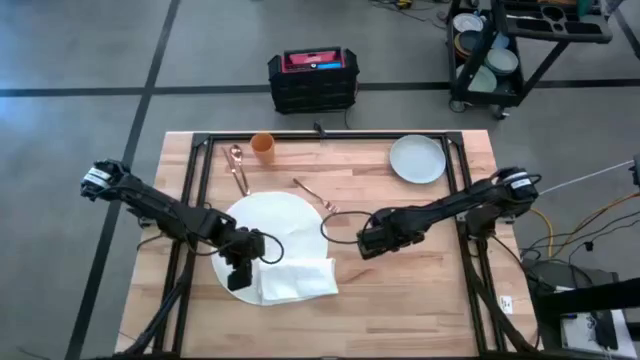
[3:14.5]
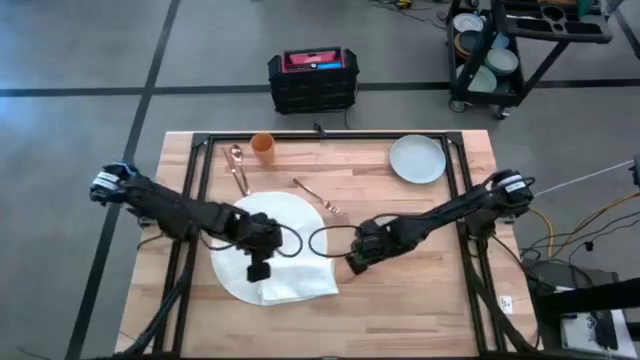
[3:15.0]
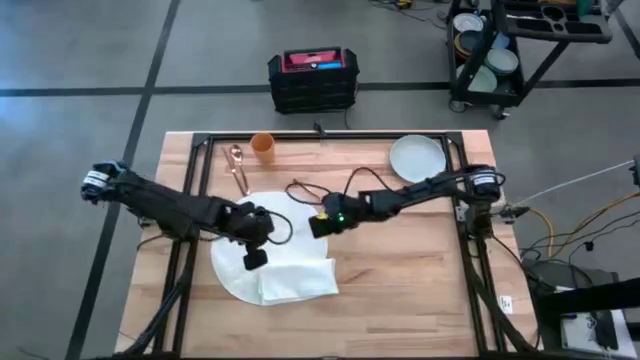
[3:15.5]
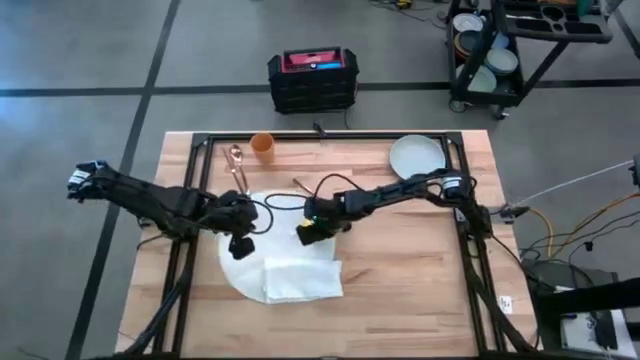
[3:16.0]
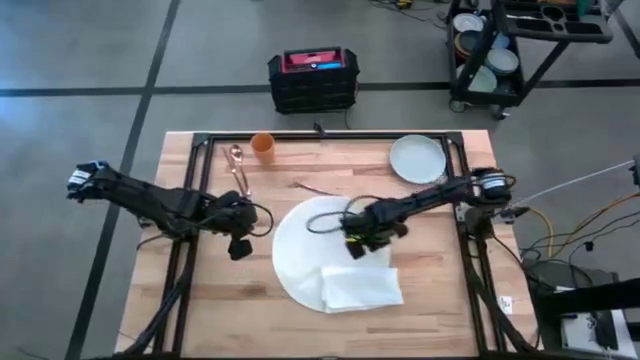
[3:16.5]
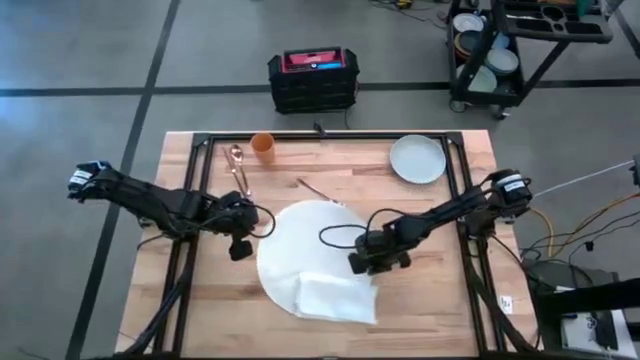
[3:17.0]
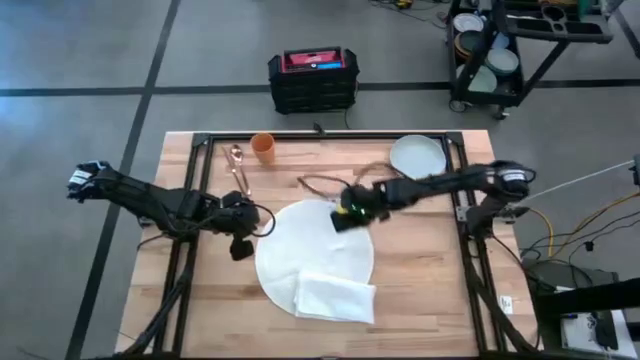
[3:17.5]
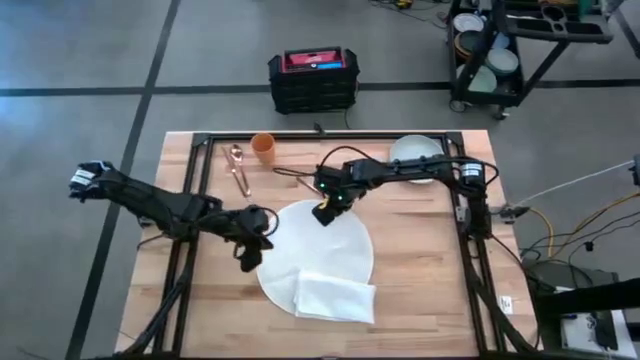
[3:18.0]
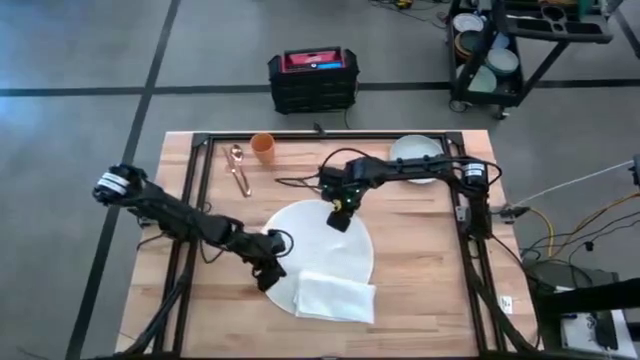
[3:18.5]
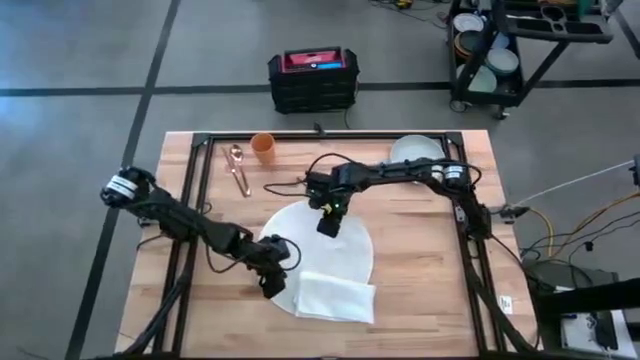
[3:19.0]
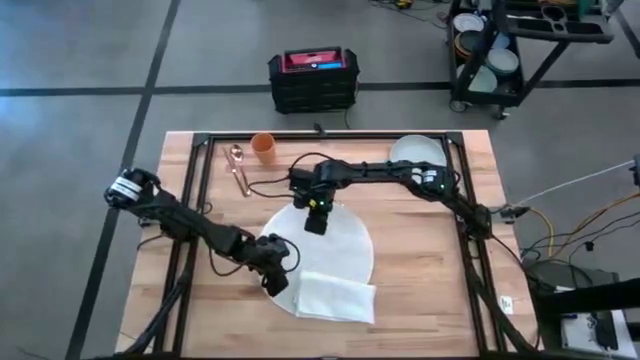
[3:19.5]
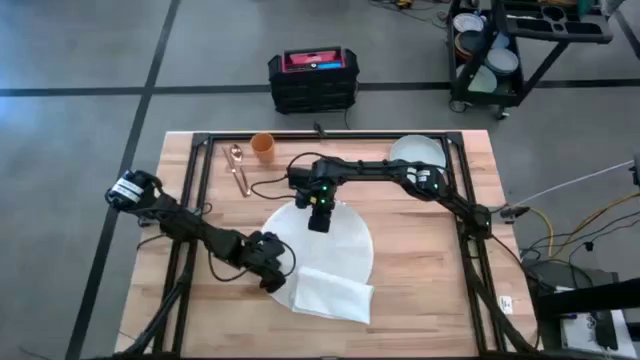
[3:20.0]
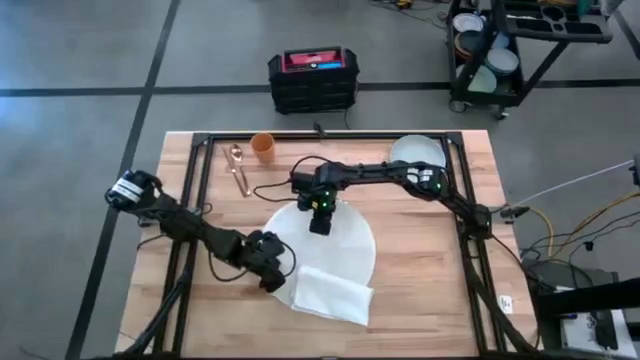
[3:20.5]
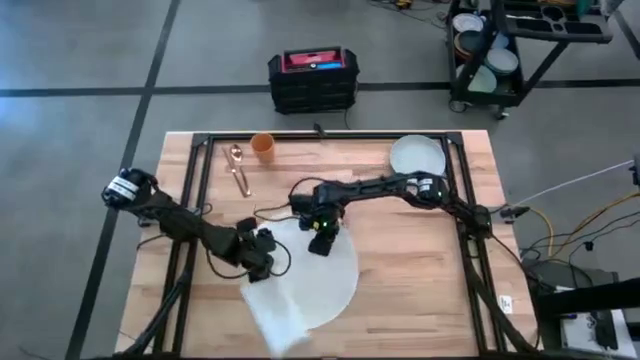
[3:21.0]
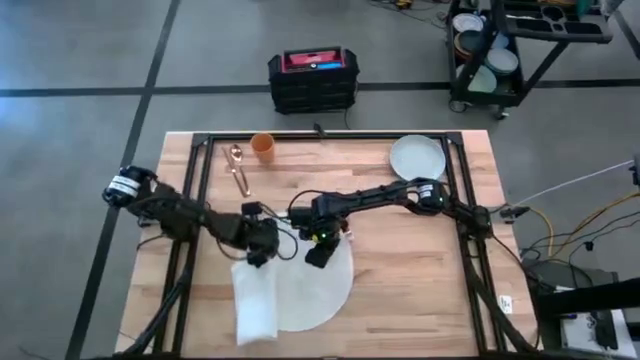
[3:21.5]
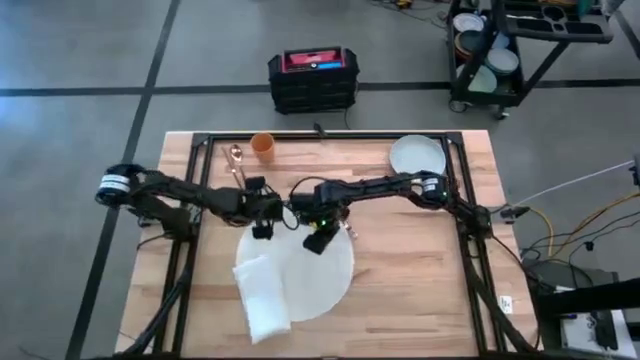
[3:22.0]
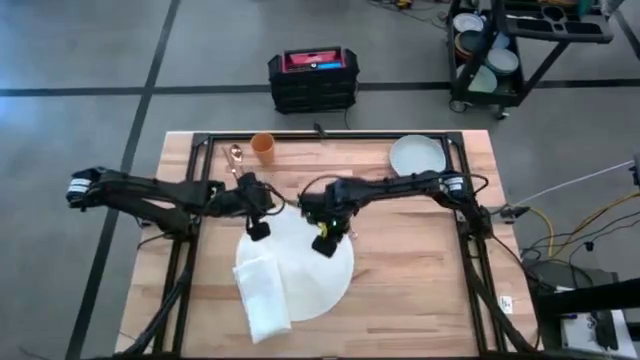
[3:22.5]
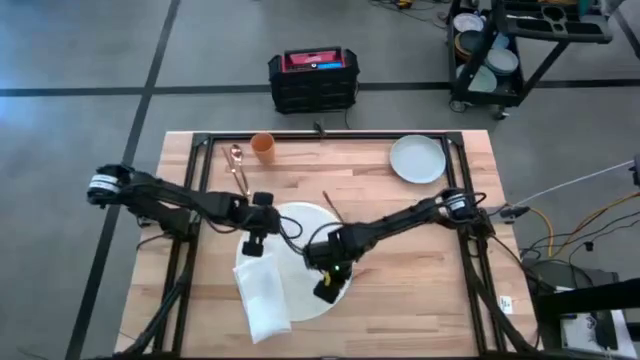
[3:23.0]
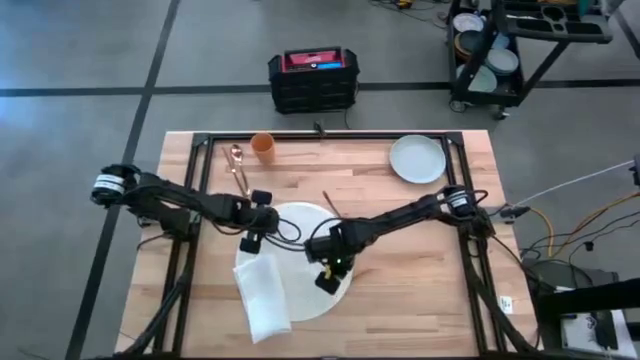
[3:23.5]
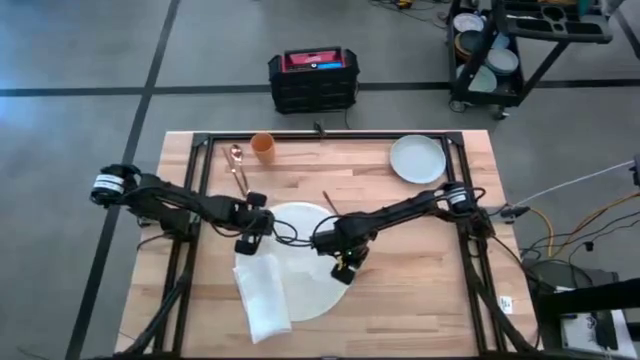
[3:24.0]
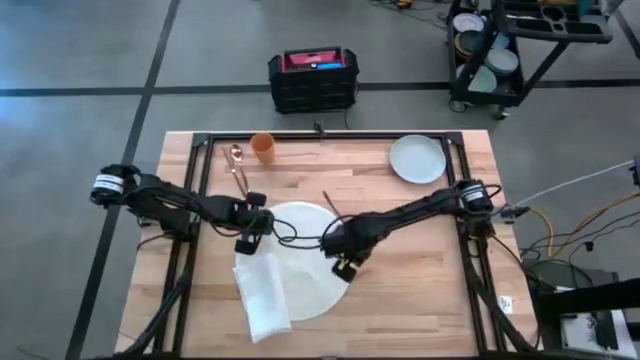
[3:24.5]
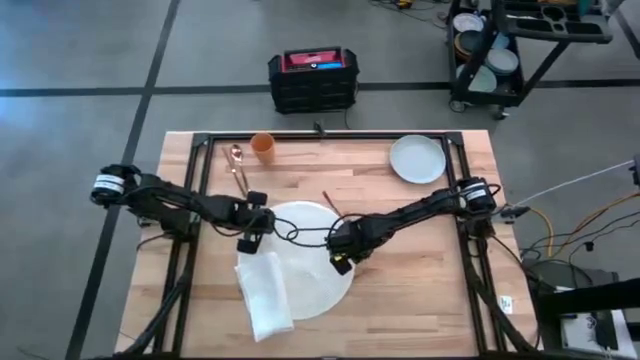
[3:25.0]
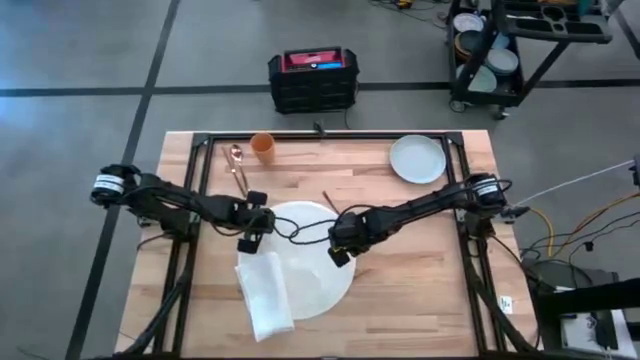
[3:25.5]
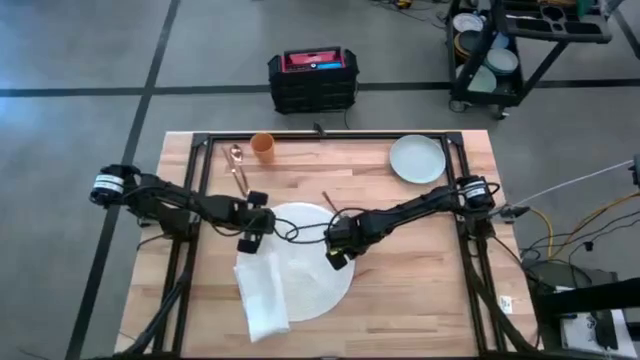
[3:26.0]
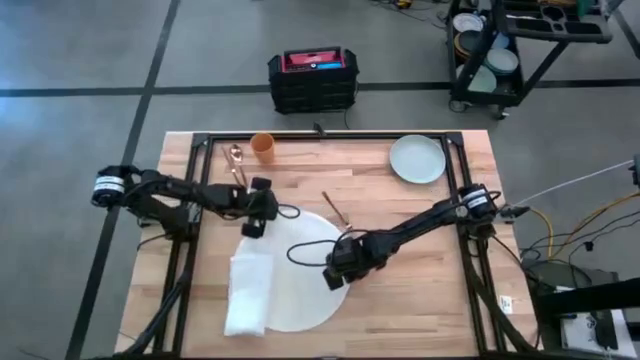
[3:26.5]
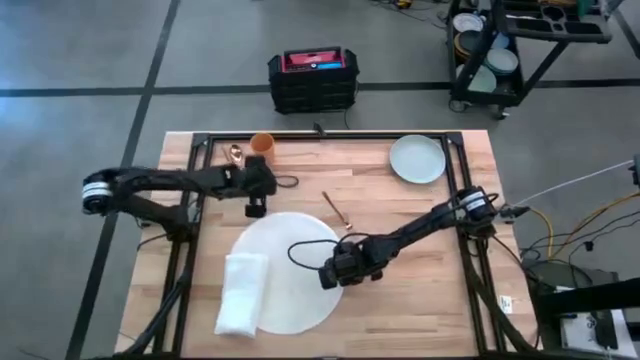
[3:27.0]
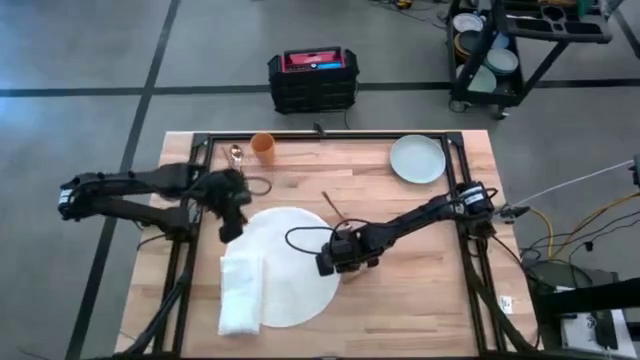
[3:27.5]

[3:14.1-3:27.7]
Task: Set table place
Adjust the white mat on the table

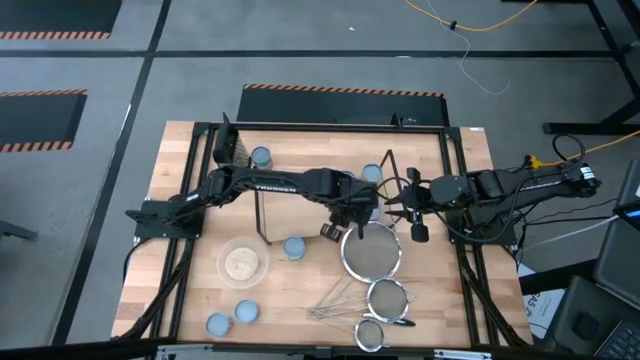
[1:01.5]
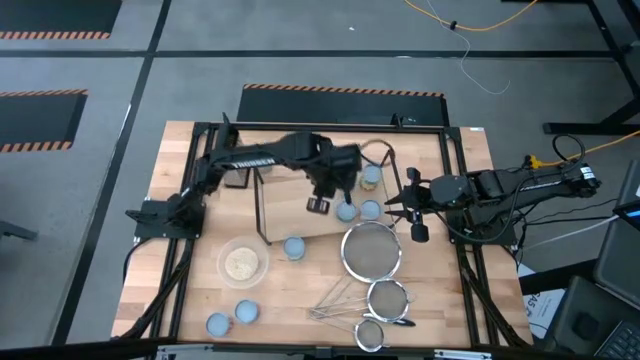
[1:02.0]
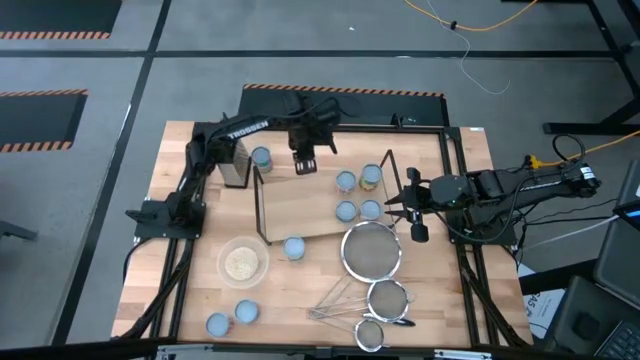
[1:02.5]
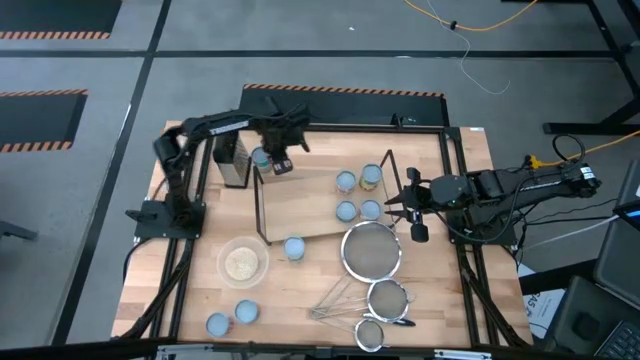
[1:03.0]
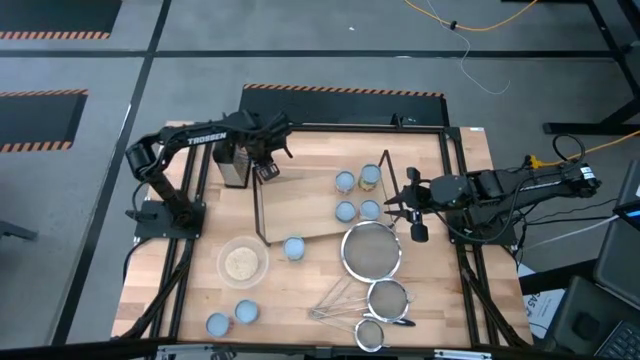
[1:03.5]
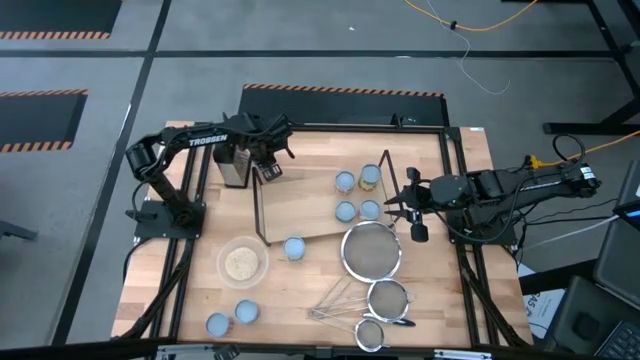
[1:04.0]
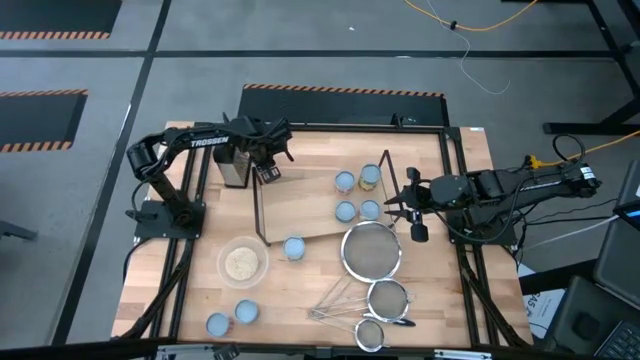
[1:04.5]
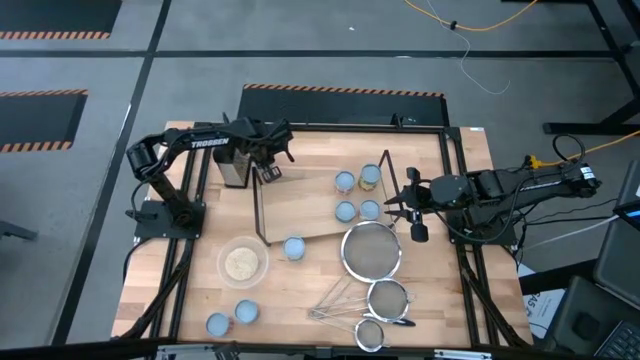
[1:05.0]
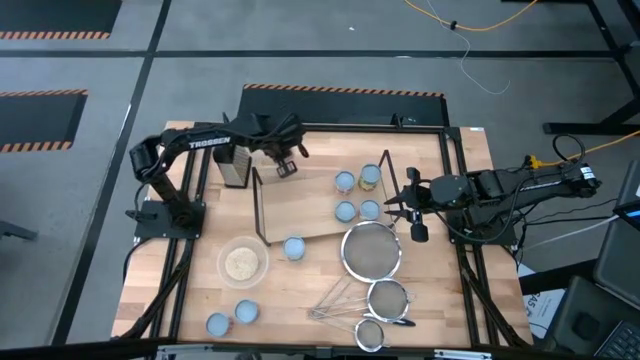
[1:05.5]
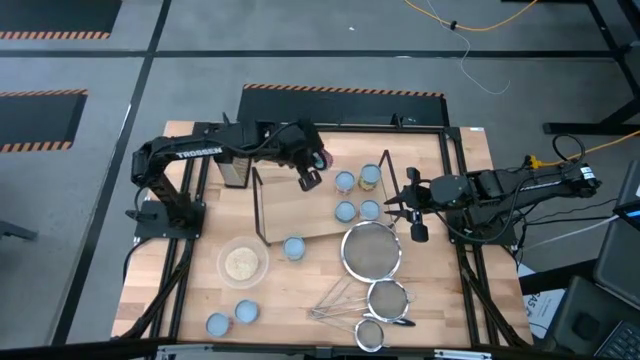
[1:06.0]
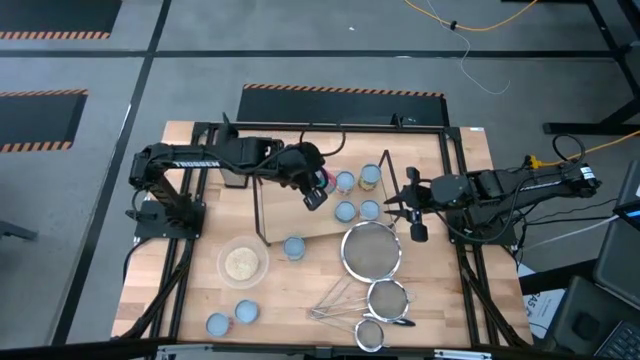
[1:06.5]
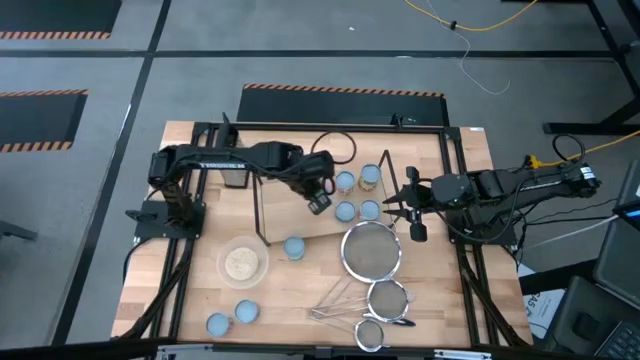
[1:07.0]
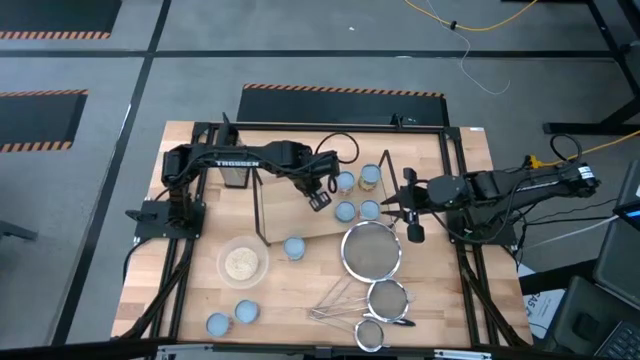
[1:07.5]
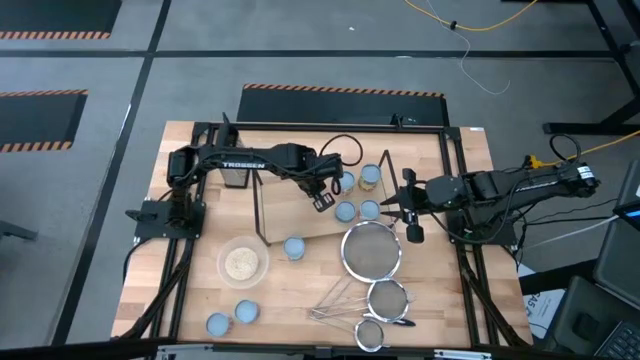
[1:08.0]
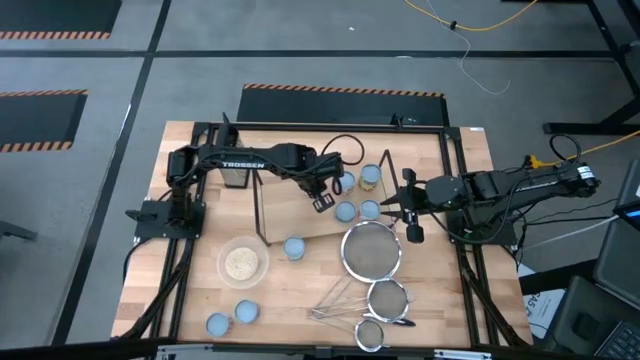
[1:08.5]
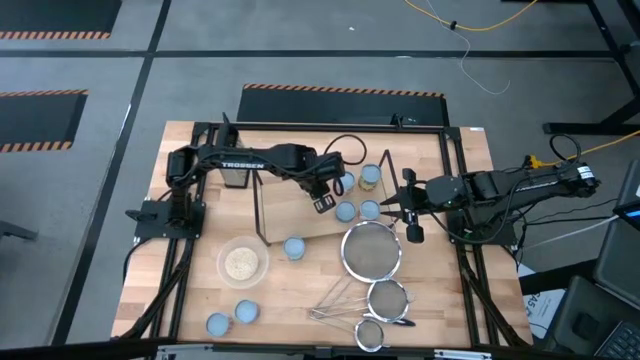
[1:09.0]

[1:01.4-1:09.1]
Task: Pick and place cans onto a shelf
Put the large pink can on the shelf
